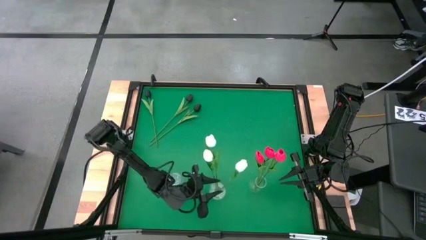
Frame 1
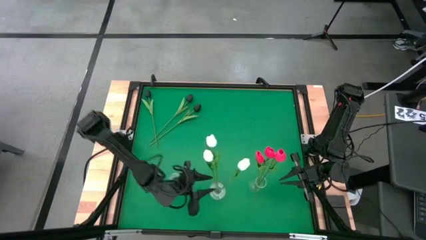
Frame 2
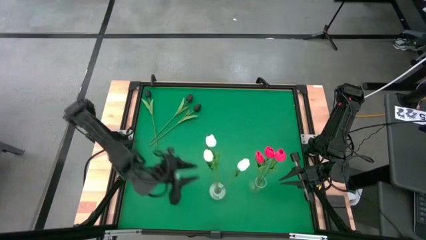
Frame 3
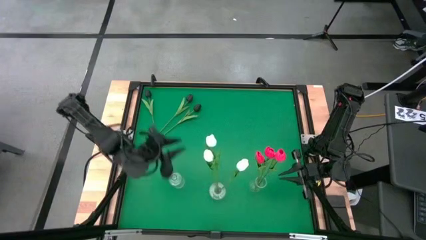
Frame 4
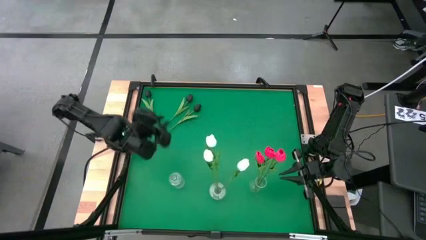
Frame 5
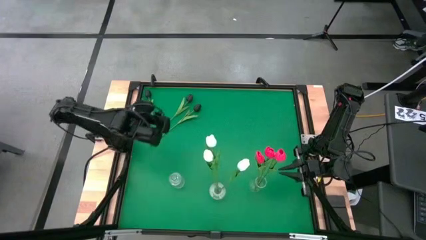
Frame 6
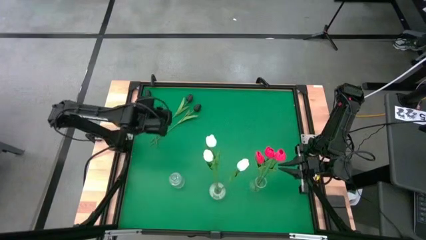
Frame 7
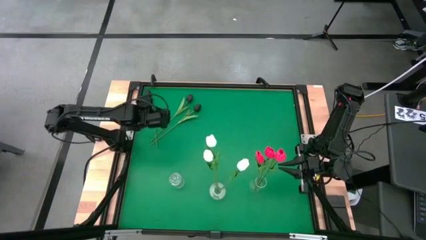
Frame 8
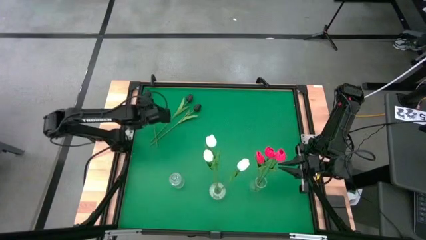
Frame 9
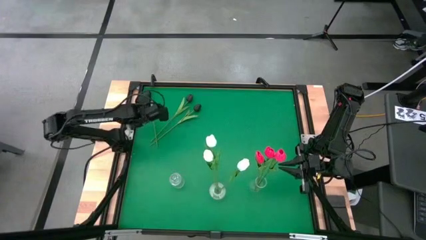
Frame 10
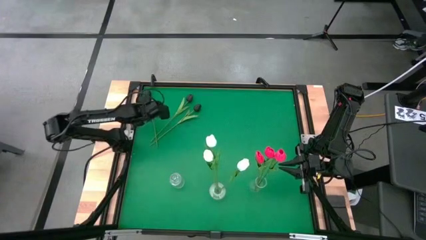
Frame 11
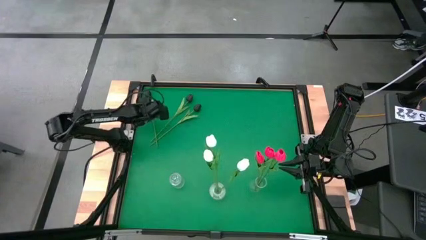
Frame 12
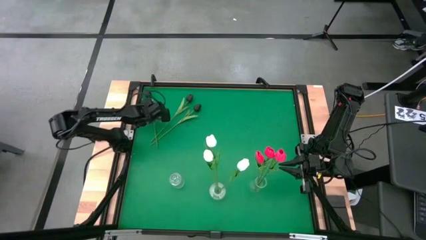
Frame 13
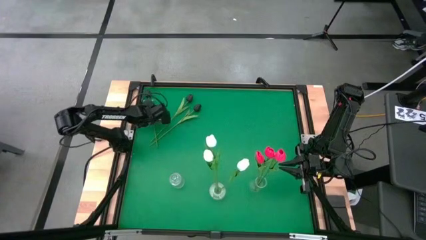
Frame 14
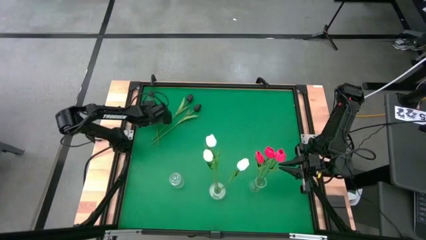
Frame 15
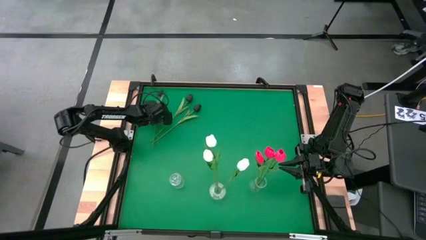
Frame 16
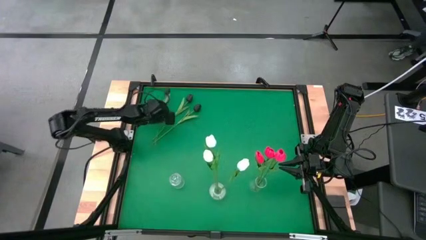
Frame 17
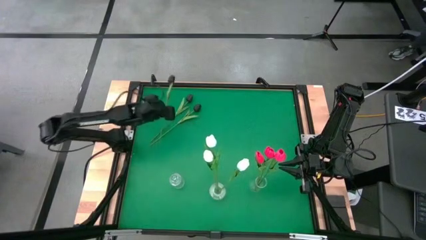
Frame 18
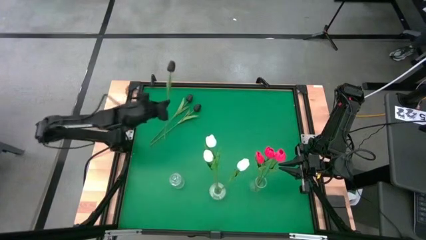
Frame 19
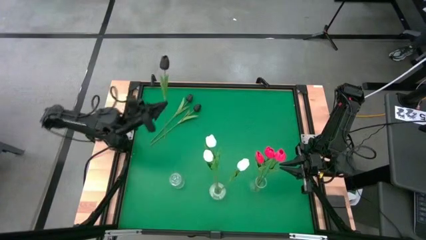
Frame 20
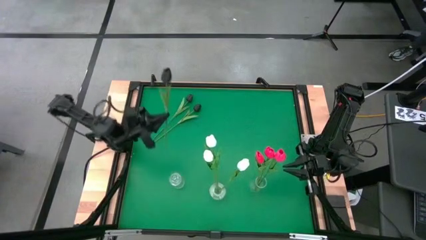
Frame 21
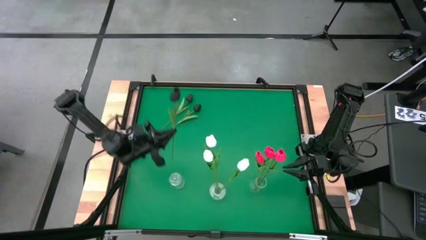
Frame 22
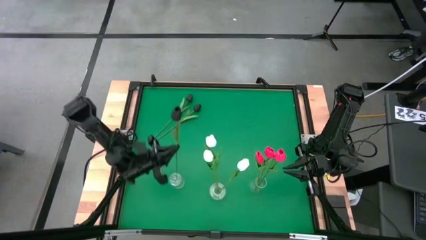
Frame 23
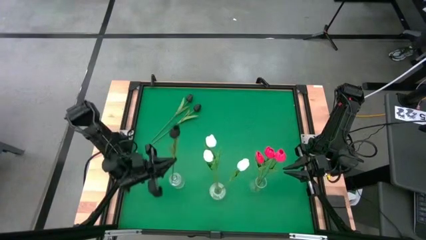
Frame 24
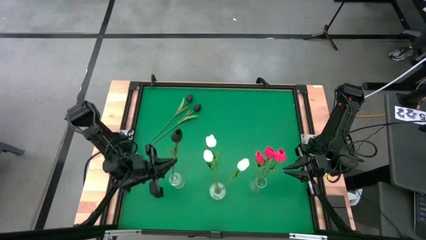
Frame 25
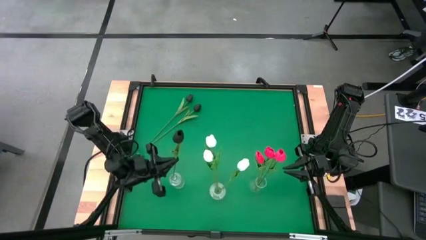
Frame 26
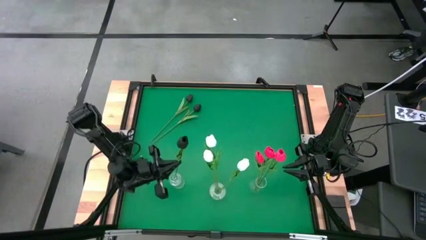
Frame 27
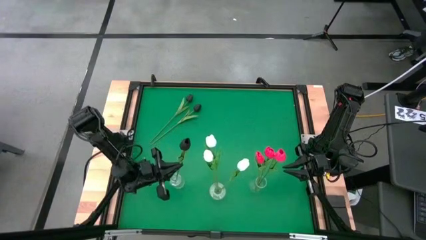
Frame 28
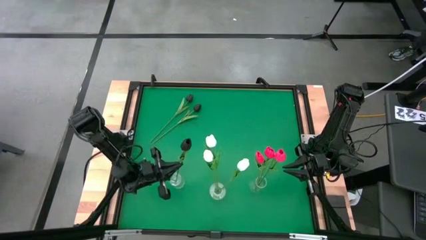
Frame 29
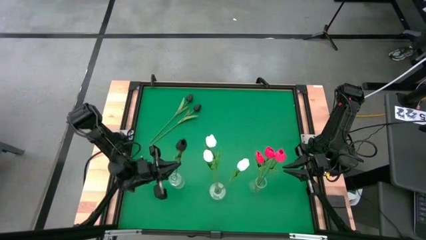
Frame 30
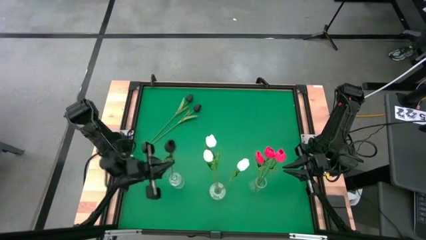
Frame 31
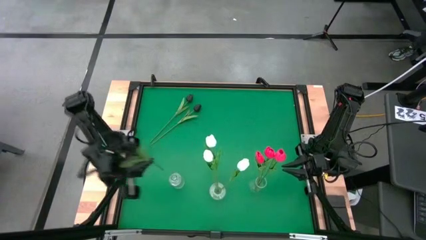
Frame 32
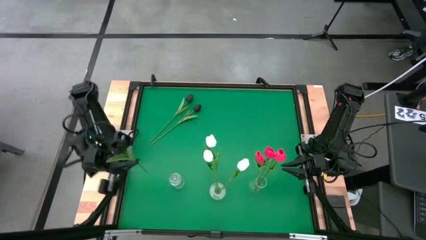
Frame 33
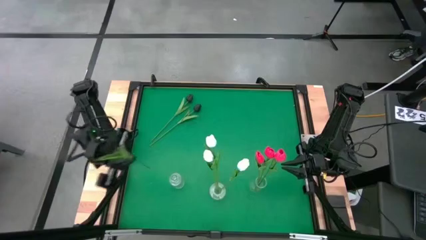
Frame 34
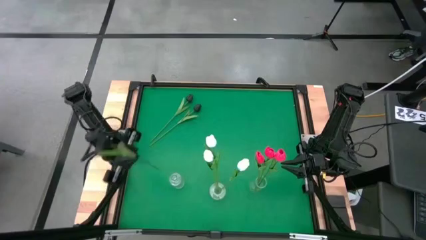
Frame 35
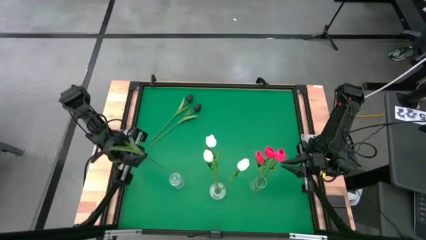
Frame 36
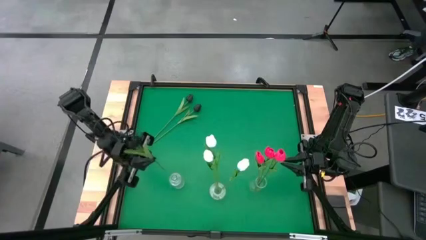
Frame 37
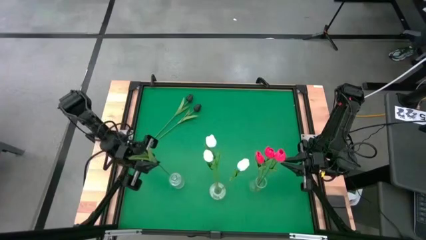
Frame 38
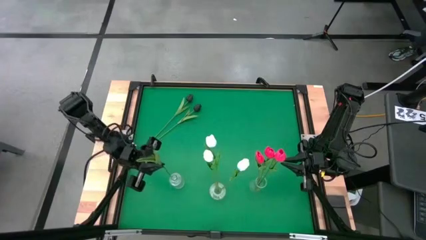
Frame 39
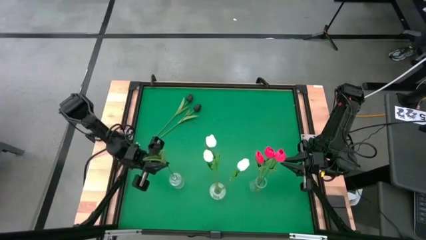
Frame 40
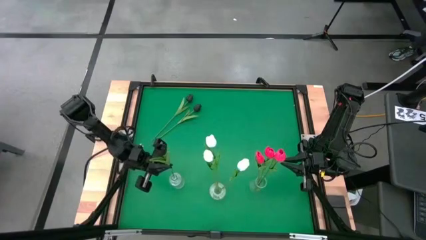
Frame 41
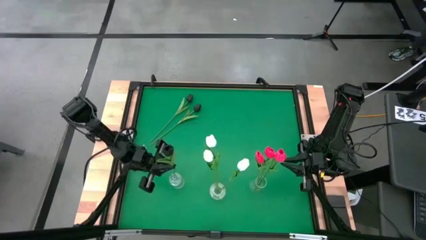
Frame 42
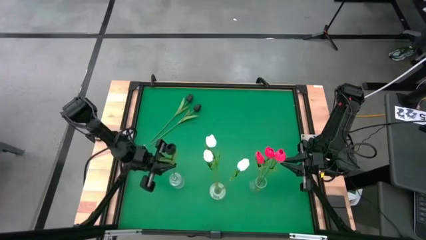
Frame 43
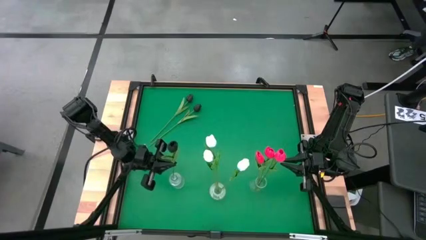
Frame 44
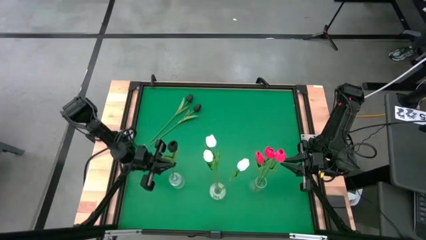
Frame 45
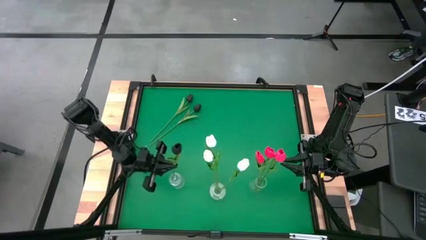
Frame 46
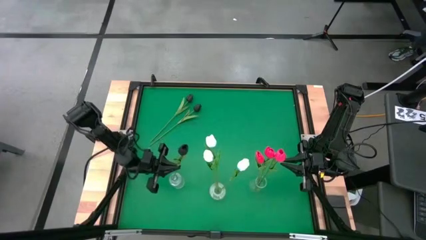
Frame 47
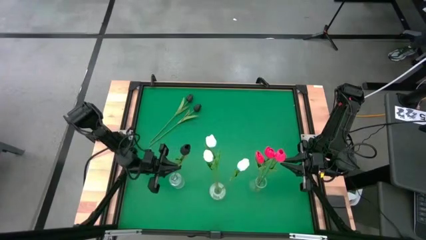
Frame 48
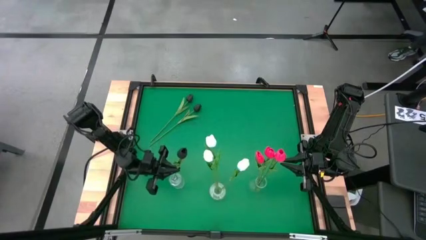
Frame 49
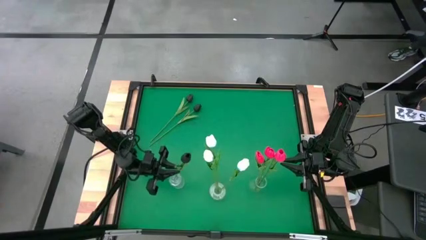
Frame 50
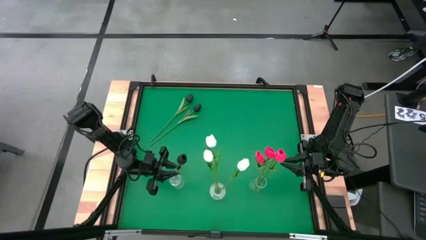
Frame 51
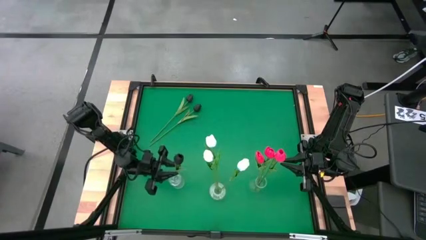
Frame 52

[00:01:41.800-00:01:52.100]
Task: Sort flowers into vase by color
Put the top left black tulip into the left transparent vase

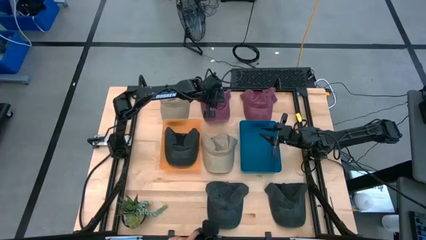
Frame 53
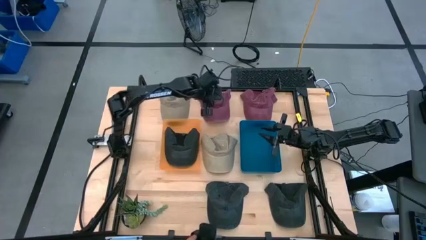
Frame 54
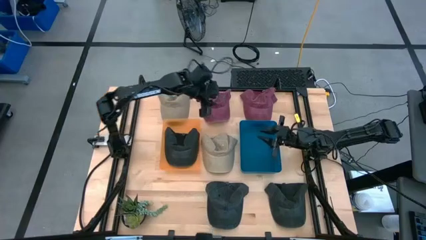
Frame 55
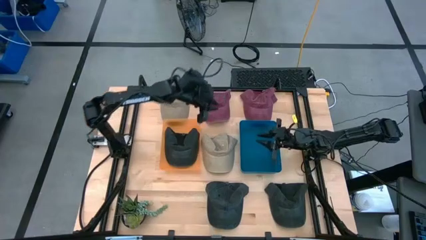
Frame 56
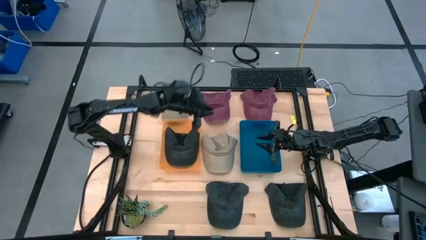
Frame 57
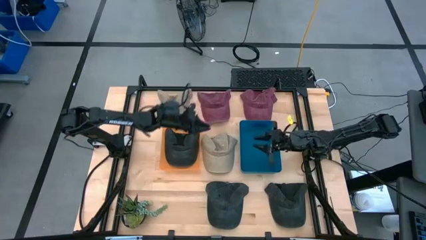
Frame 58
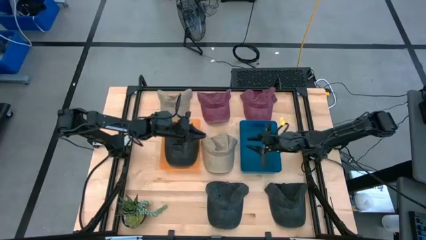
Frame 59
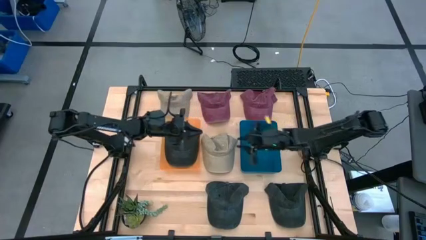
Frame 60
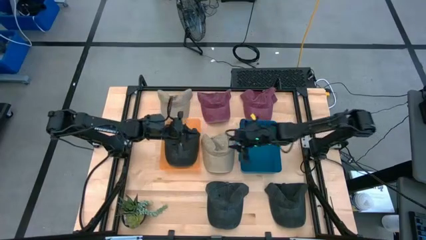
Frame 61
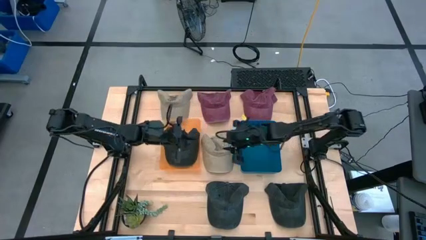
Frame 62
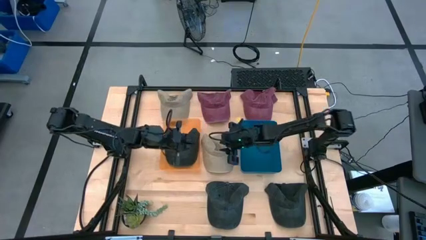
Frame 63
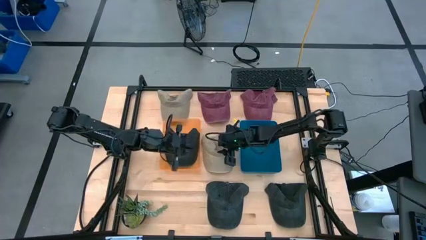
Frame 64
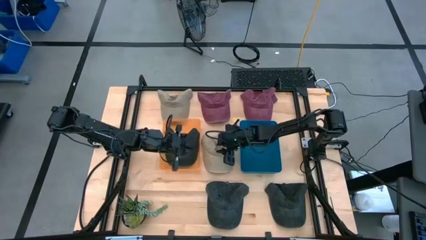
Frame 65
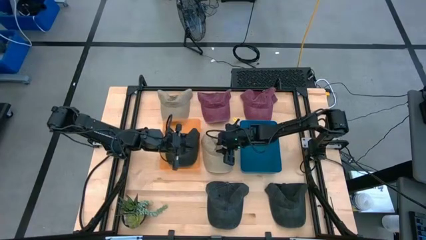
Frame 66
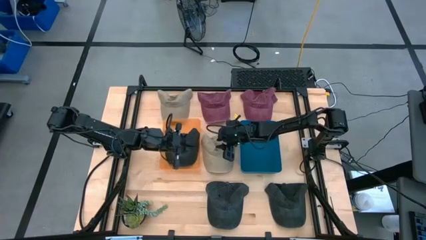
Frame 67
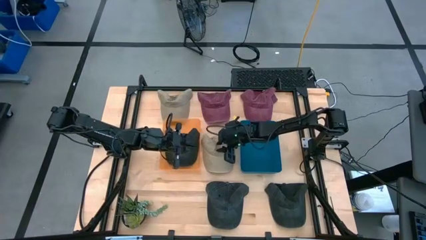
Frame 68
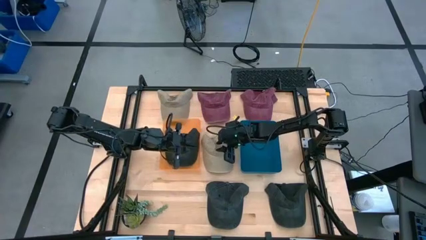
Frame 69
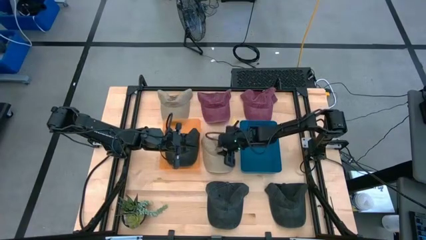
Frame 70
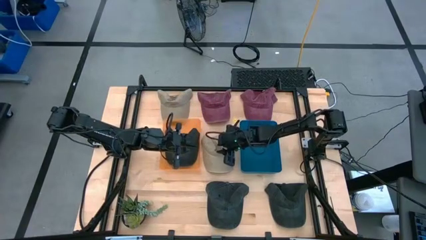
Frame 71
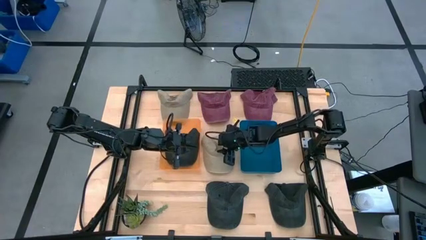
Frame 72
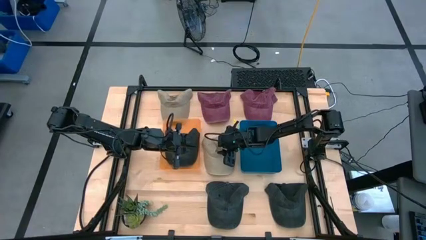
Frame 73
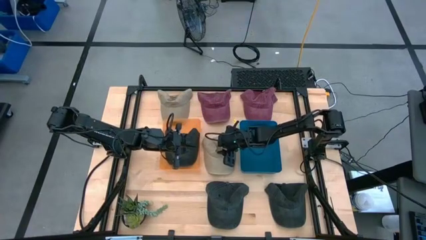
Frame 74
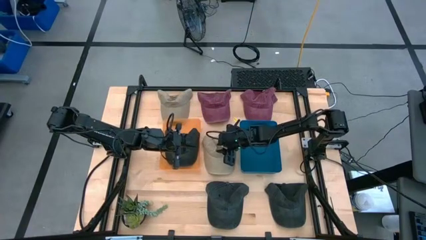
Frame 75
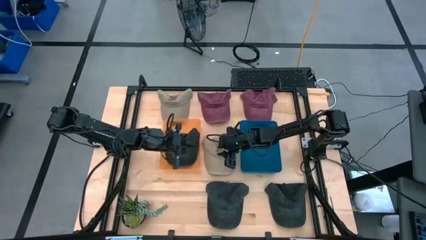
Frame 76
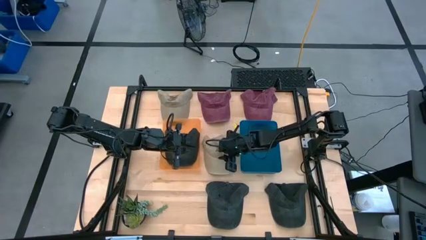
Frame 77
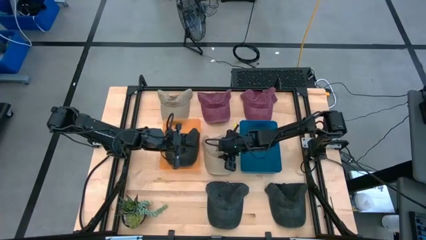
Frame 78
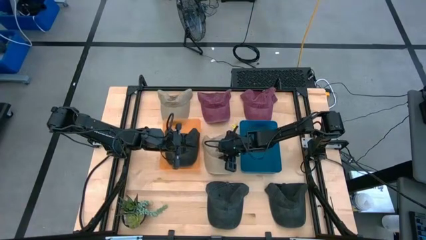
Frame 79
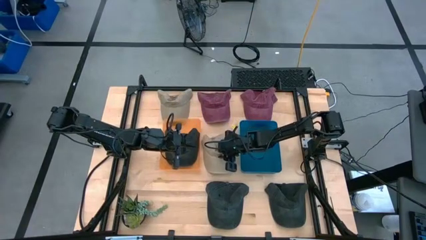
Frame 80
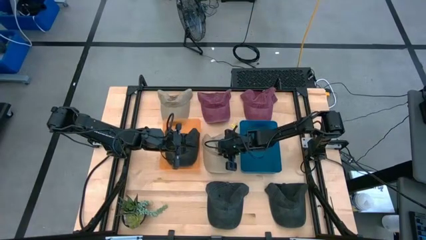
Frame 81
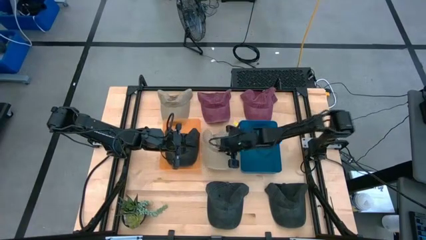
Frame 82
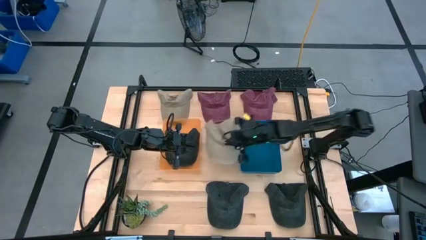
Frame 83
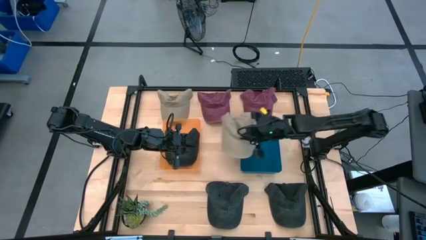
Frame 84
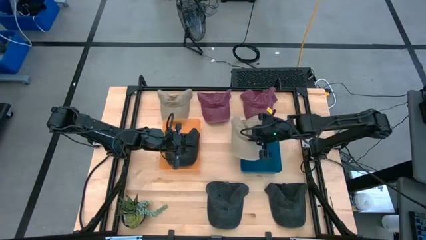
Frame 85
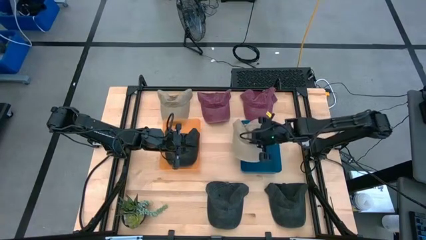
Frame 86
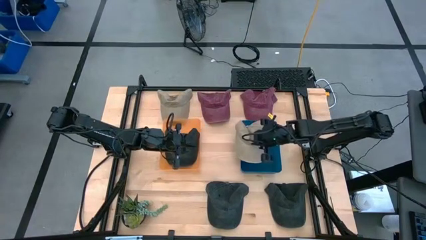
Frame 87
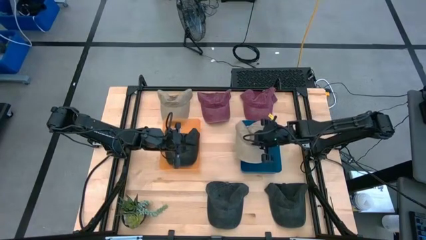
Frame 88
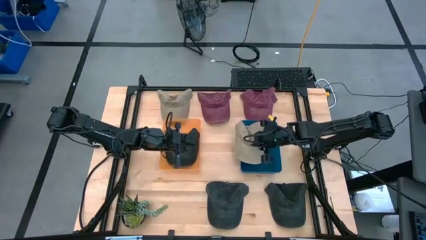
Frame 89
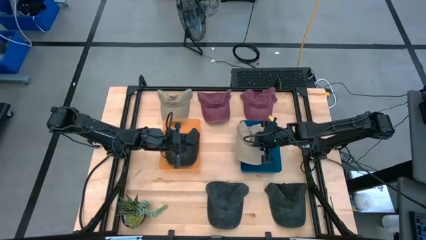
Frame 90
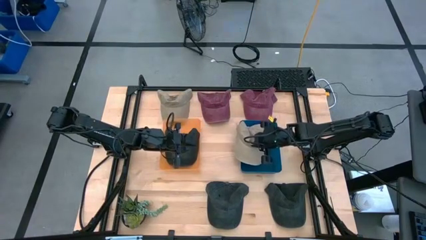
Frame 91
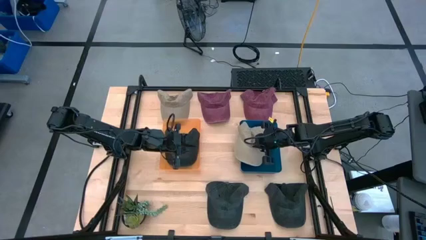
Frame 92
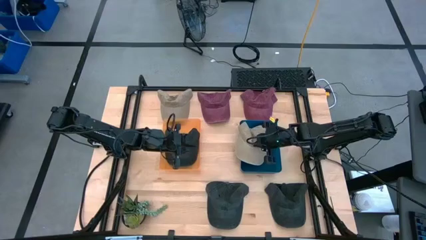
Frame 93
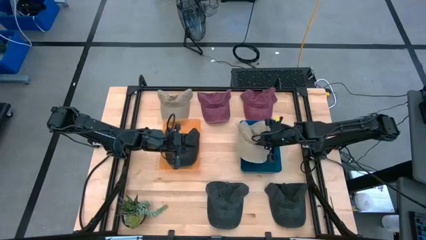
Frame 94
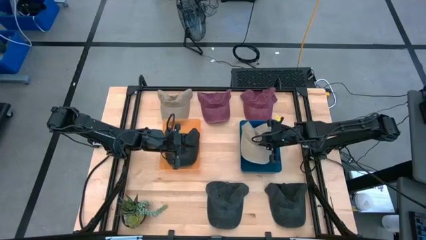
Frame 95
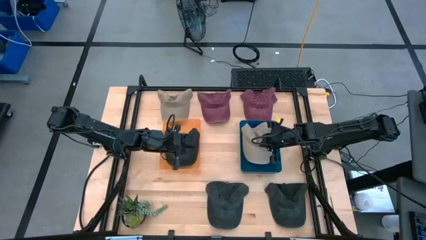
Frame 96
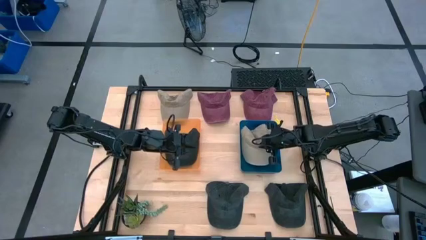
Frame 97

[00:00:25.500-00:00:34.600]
Task: Pick & Place hat
Put the bottom brown cap into the blue bin
